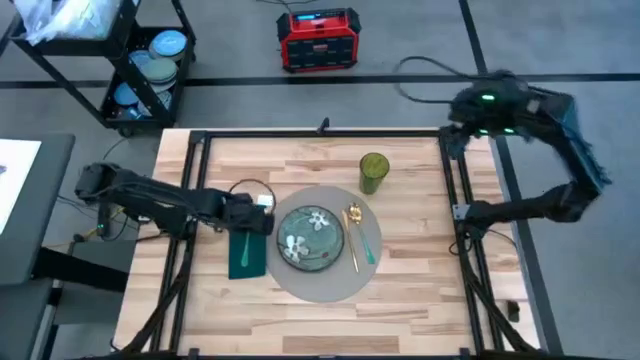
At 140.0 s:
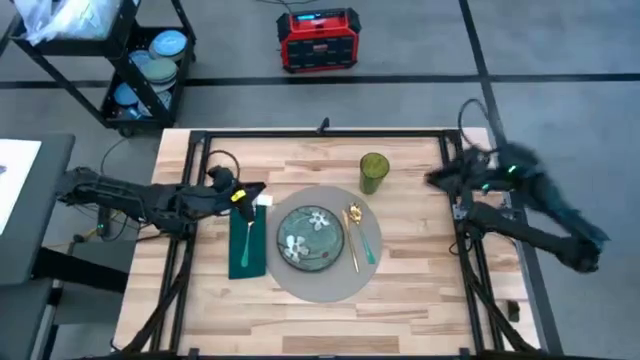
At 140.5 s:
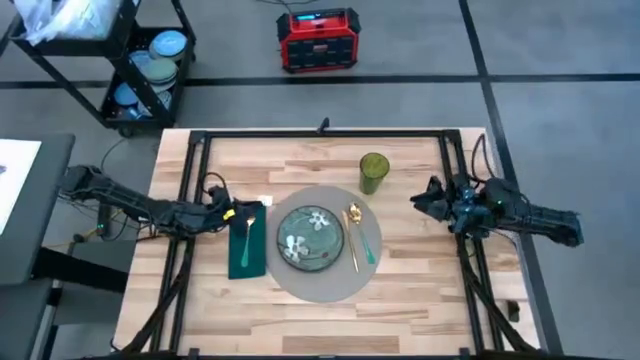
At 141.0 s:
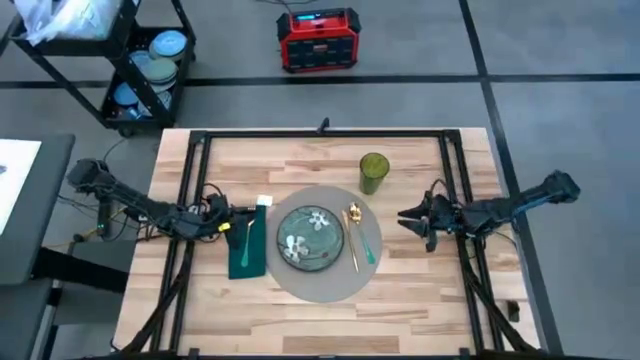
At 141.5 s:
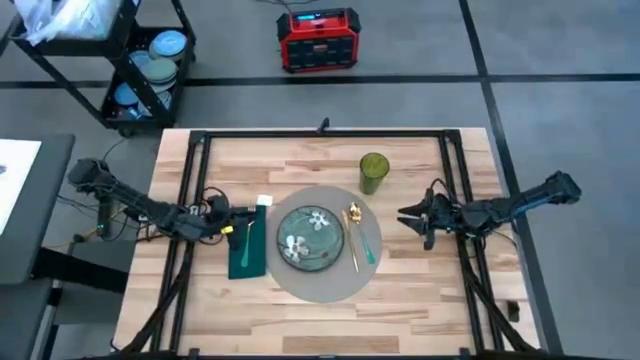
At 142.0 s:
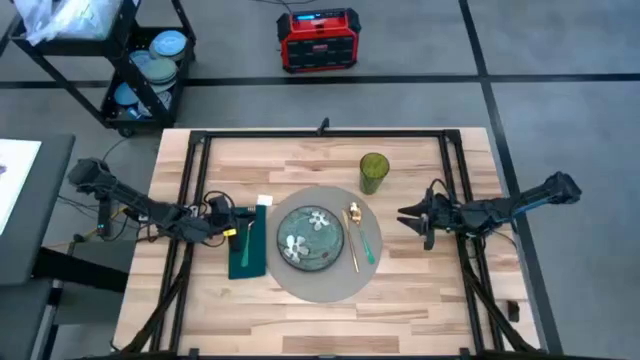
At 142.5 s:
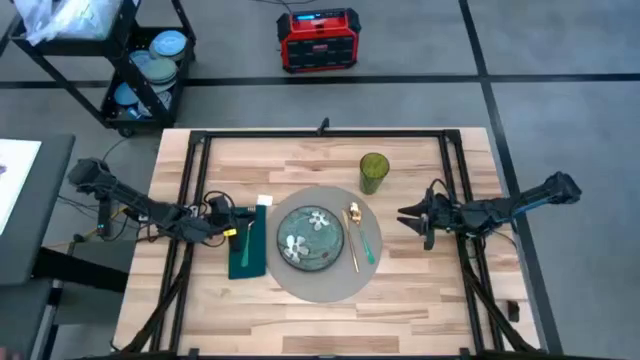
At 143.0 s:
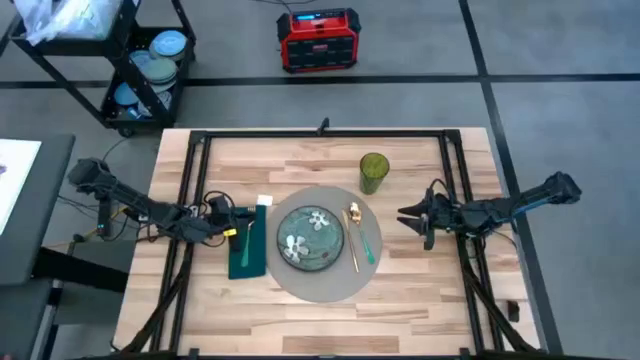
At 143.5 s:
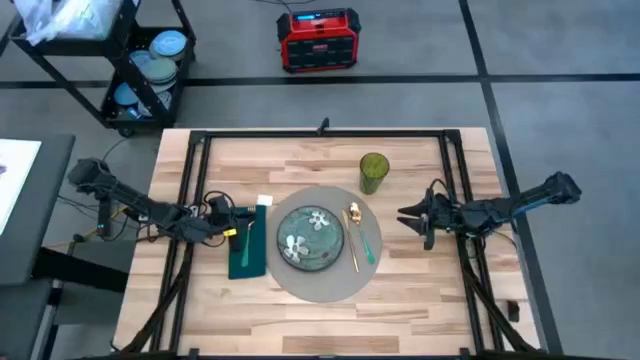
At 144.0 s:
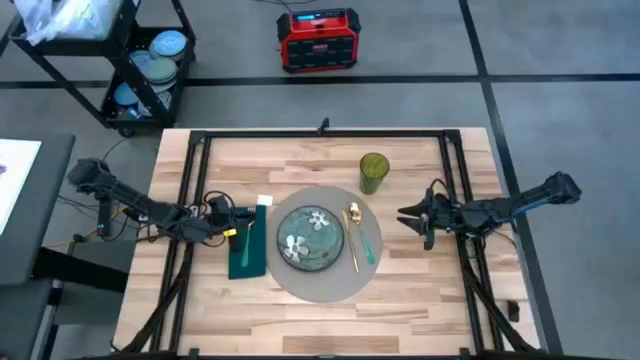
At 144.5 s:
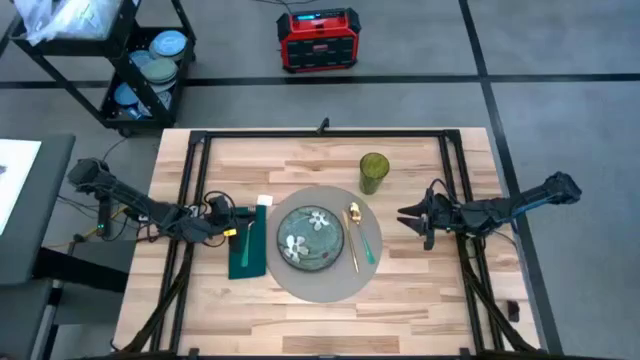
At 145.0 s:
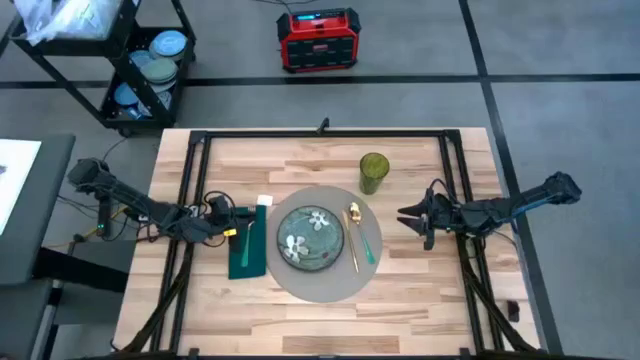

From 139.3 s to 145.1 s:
Task: Set table place
Return to Home Position

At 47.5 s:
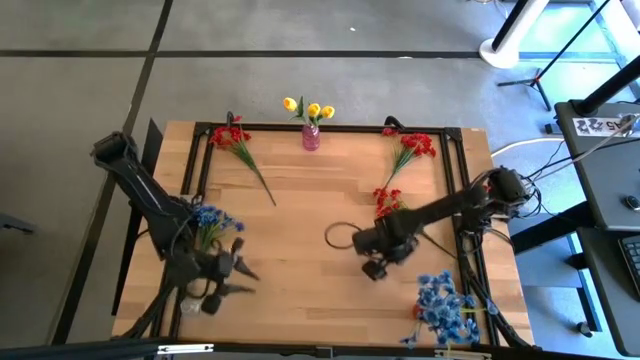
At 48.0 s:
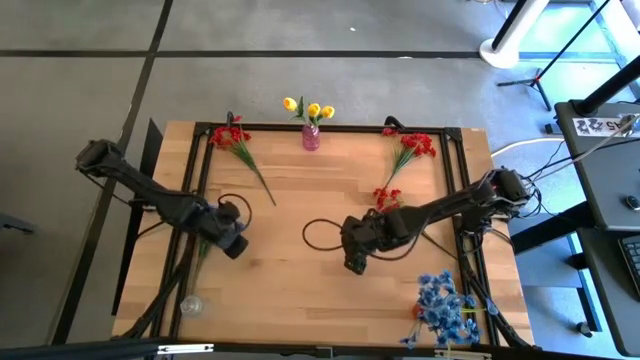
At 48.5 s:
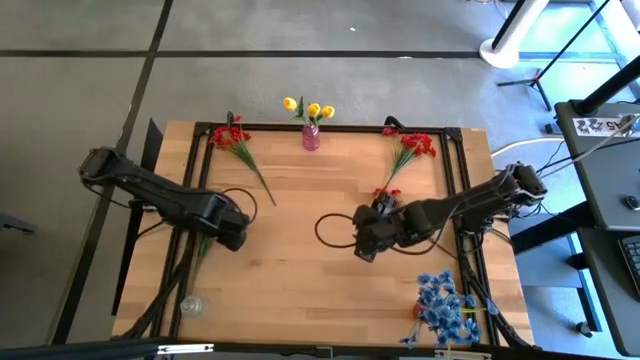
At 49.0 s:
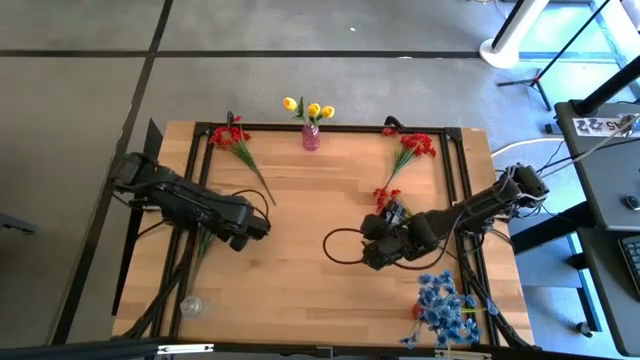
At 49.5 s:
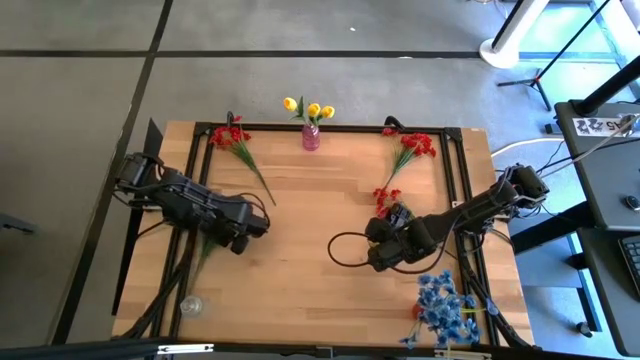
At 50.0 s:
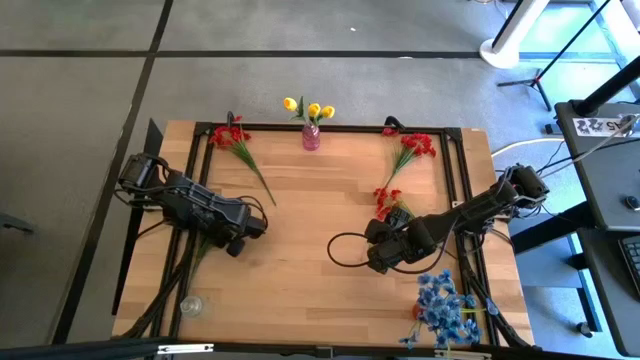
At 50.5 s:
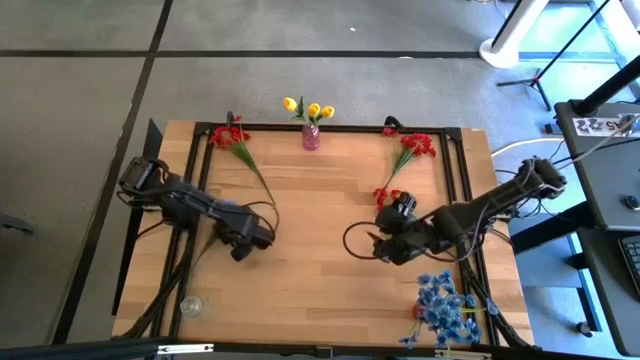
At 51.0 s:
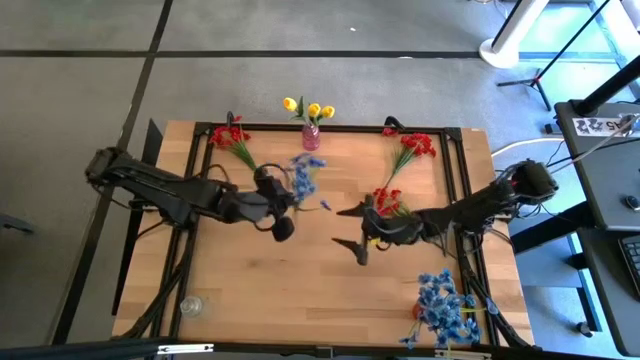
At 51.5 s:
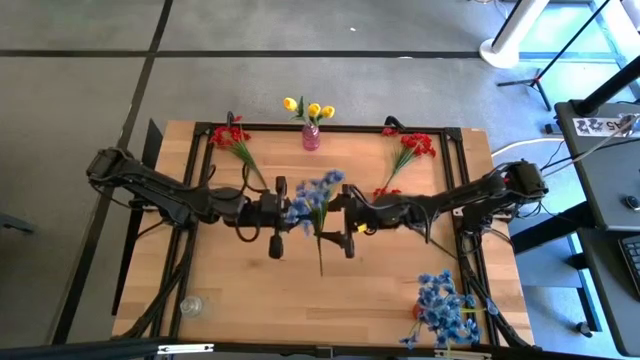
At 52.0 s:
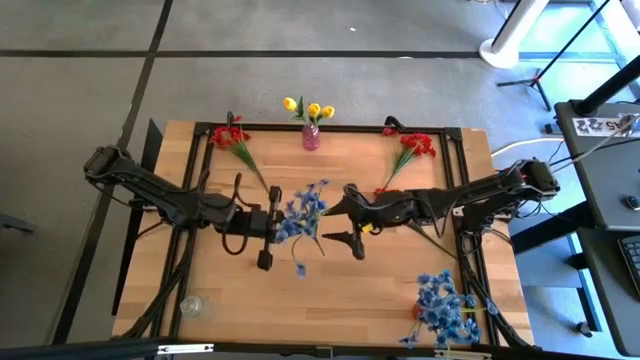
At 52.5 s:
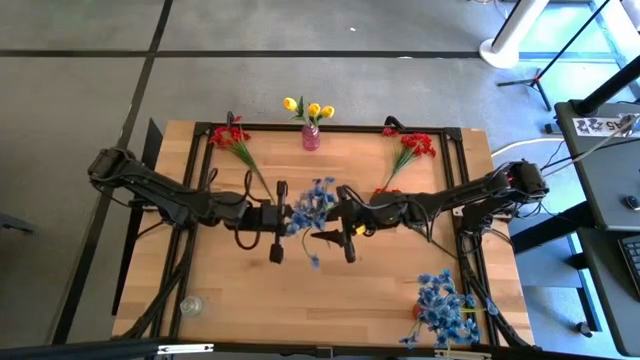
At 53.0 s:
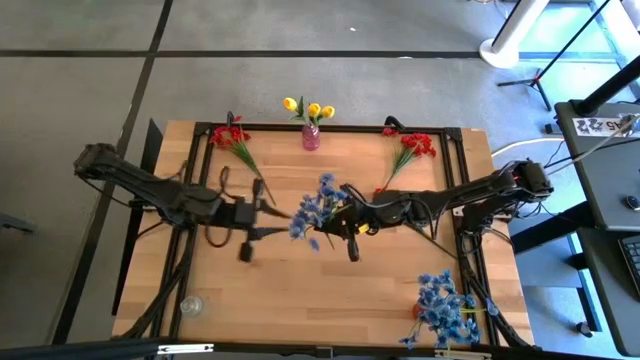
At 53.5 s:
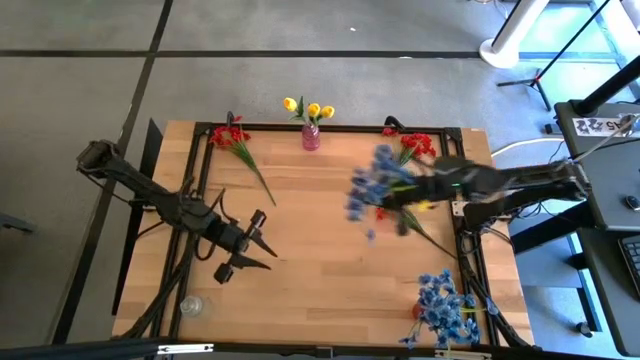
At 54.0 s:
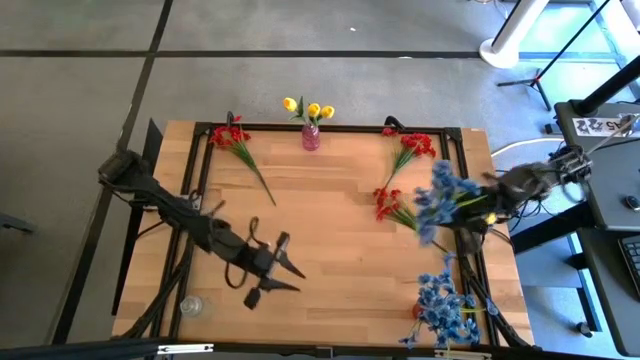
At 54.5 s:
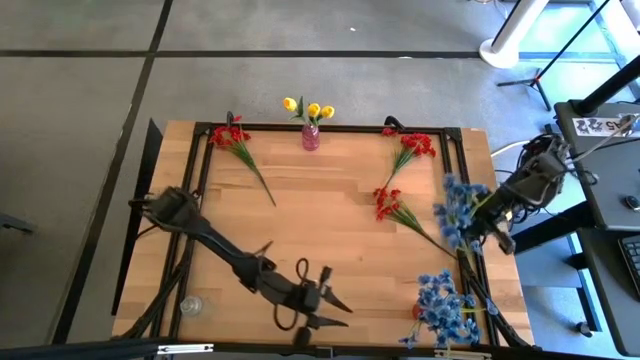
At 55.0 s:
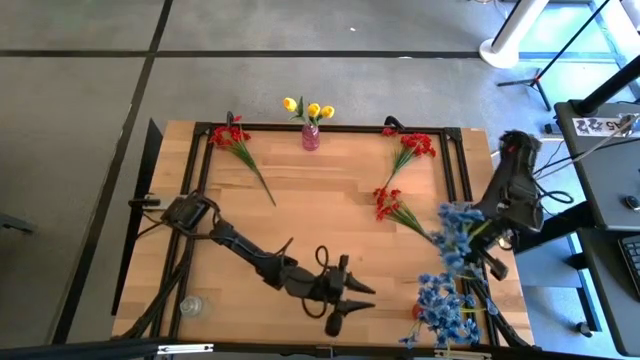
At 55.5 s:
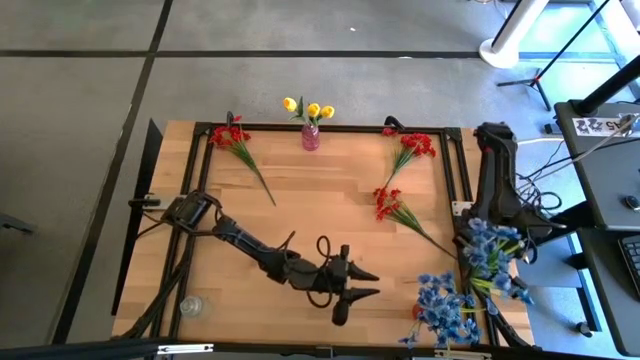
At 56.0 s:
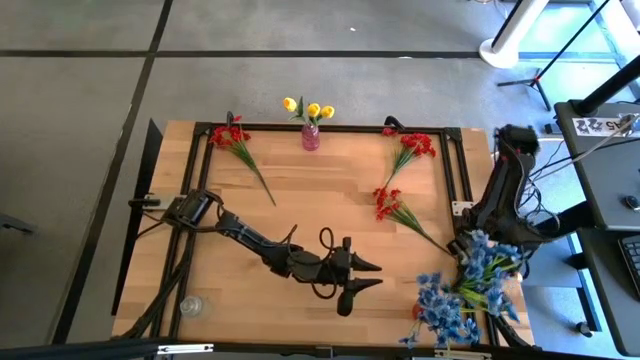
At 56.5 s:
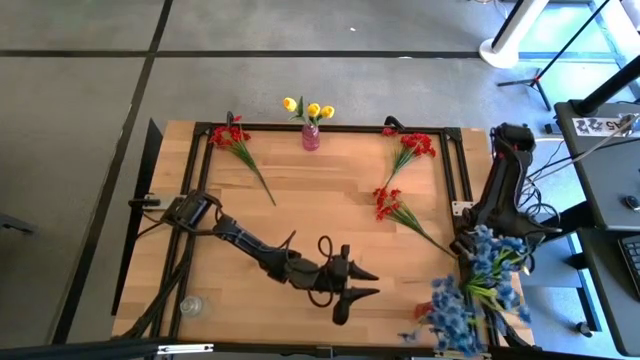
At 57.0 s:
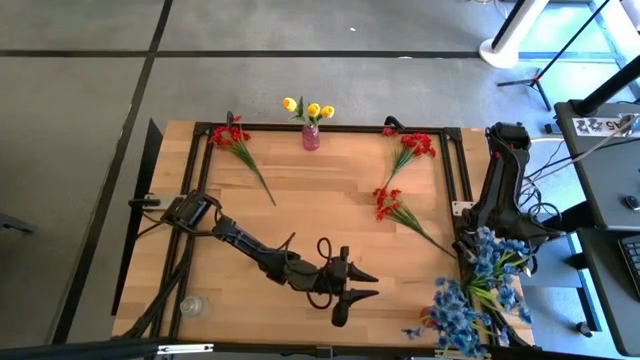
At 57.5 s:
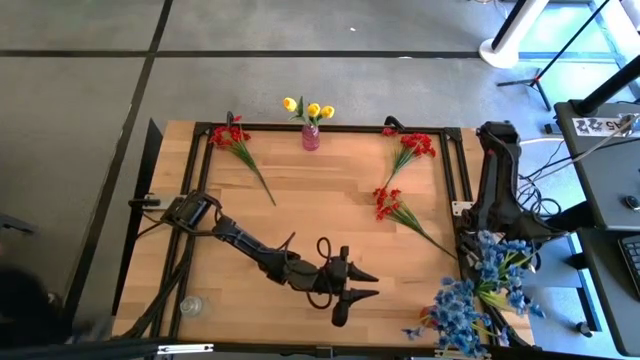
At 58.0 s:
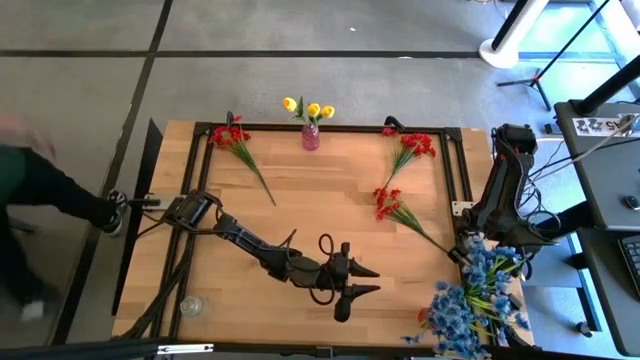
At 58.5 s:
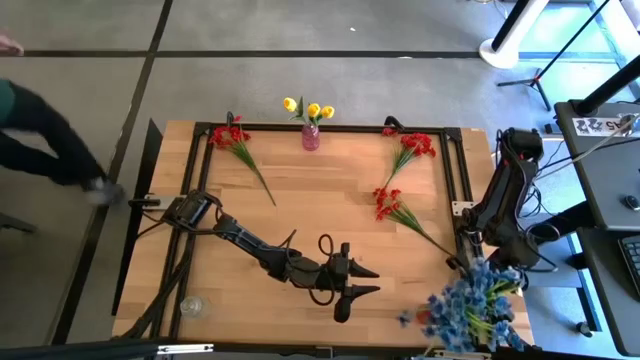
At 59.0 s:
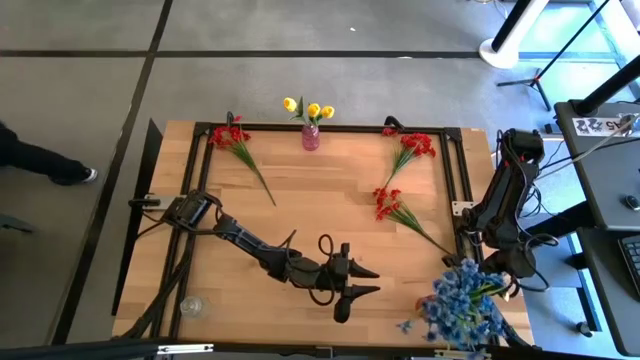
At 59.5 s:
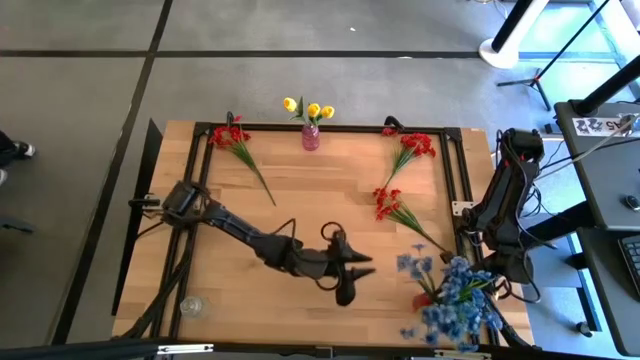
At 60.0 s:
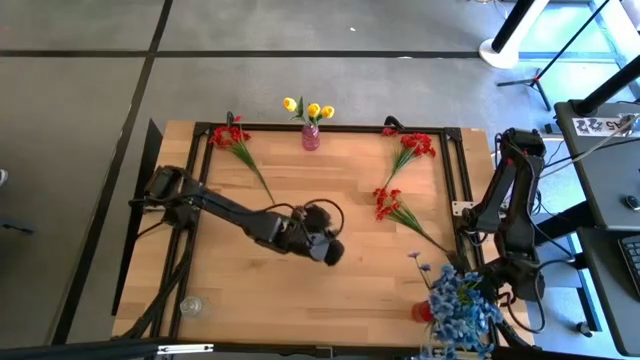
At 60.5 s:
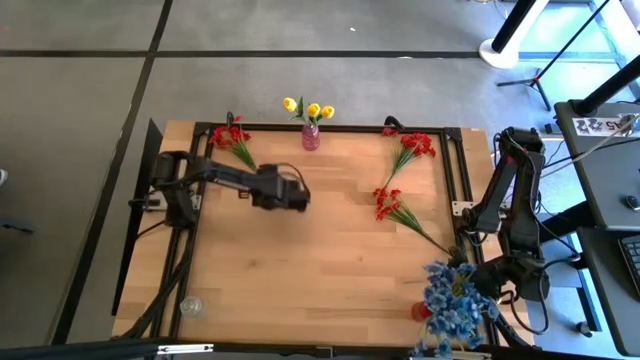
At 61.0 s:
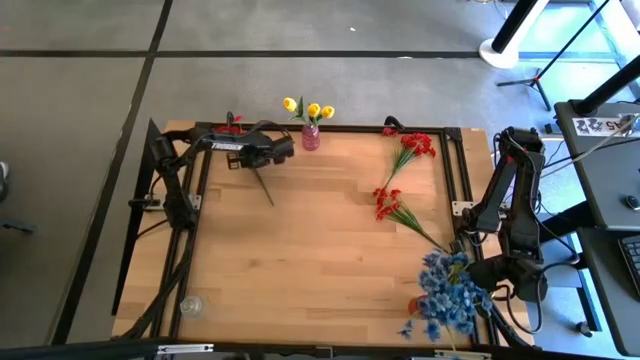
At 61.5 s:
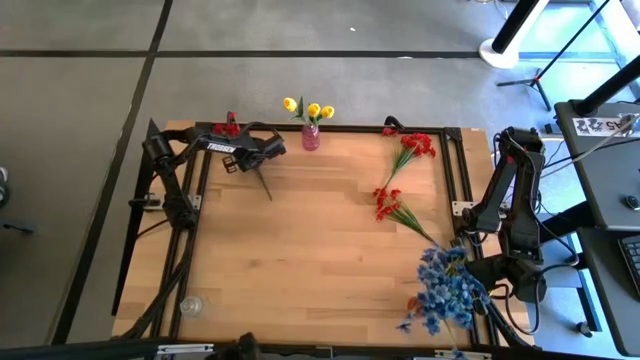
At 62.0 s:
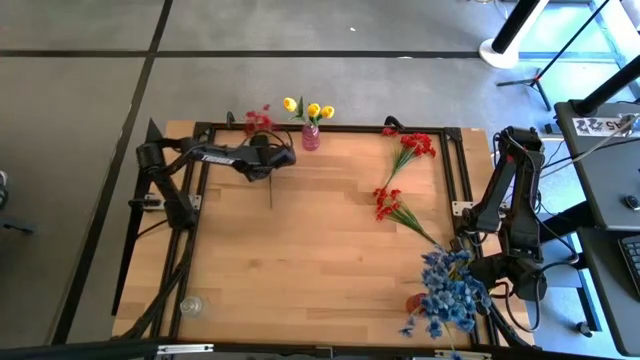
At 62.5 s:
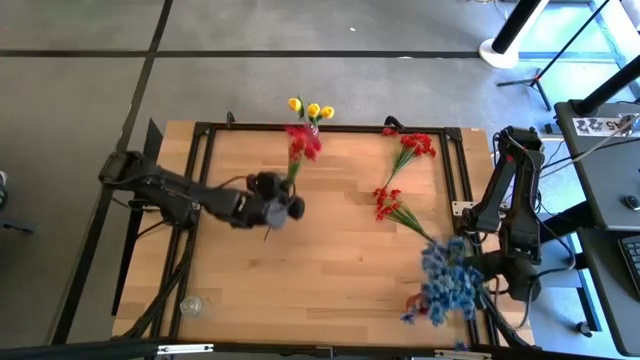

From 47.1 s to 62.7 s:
Task: Sort flowers into vase by color
Put the blue flowers into the red vase
